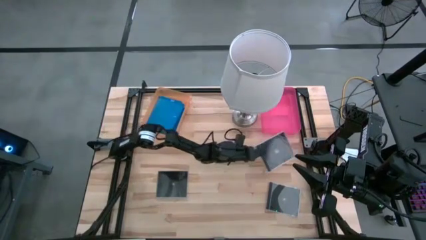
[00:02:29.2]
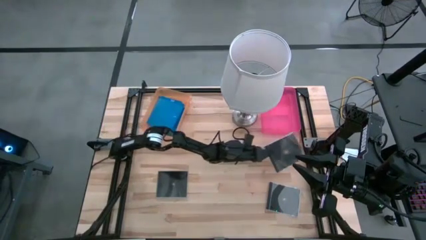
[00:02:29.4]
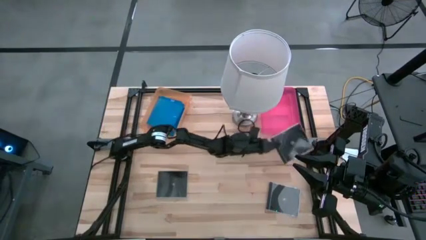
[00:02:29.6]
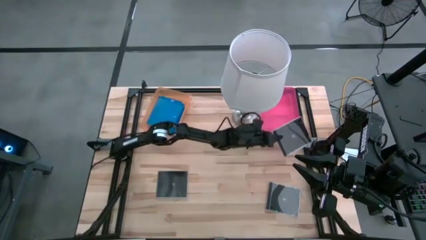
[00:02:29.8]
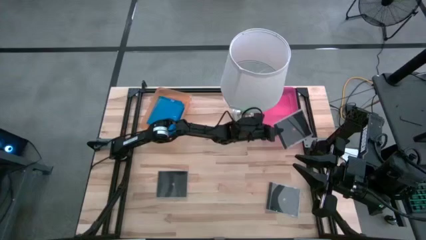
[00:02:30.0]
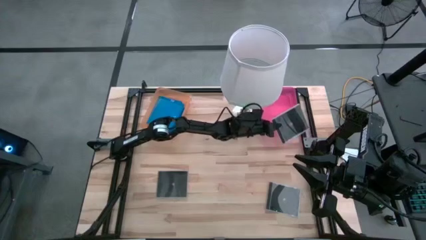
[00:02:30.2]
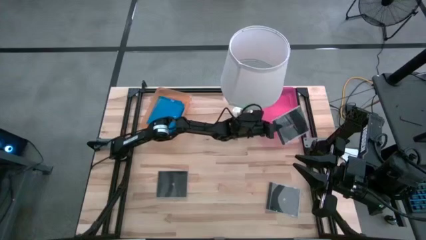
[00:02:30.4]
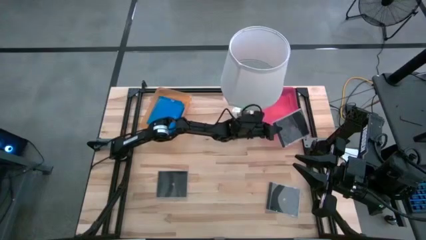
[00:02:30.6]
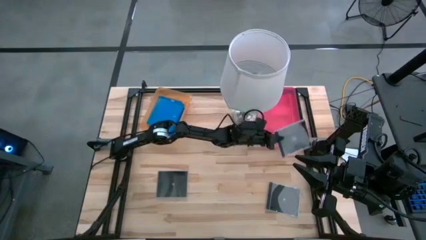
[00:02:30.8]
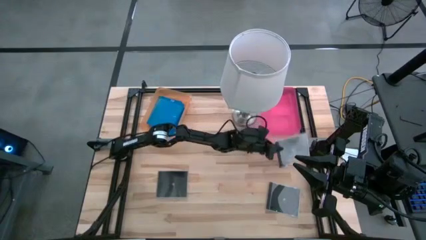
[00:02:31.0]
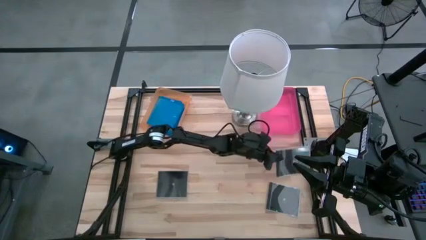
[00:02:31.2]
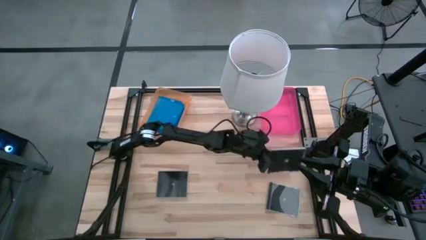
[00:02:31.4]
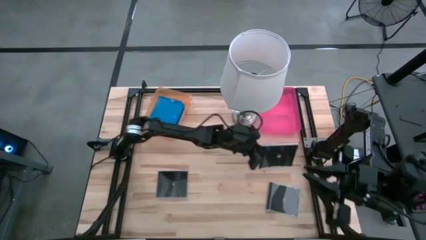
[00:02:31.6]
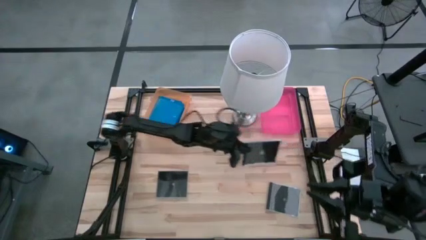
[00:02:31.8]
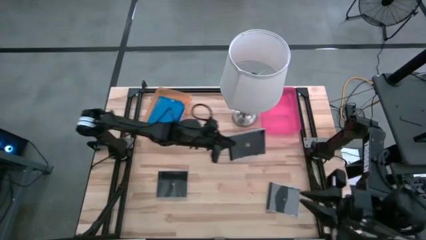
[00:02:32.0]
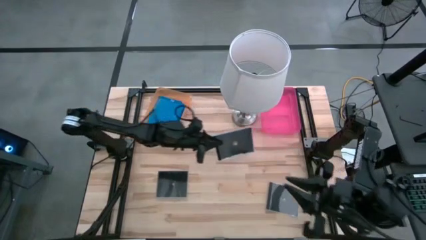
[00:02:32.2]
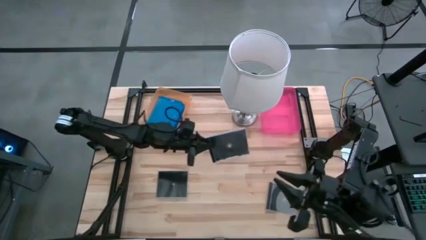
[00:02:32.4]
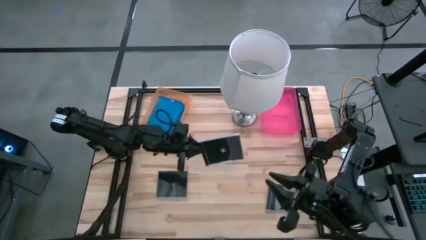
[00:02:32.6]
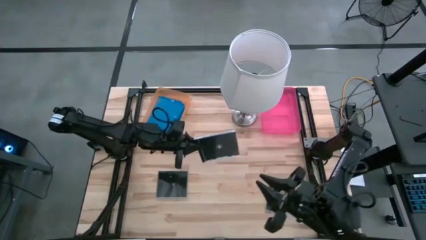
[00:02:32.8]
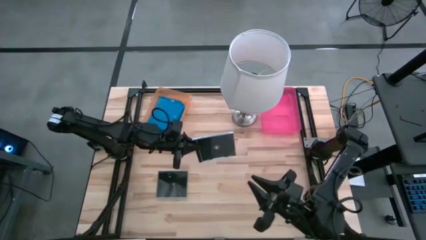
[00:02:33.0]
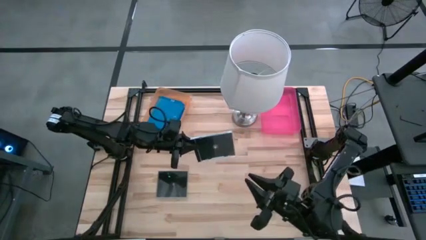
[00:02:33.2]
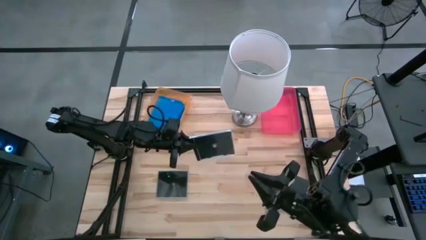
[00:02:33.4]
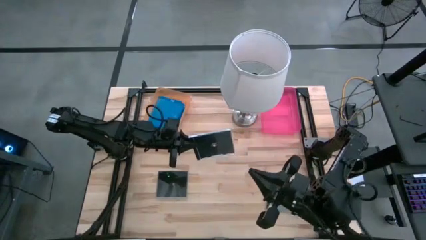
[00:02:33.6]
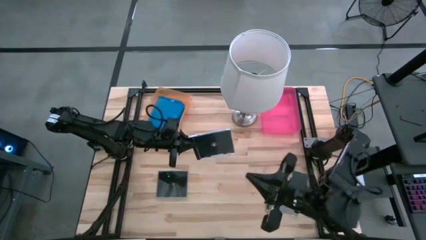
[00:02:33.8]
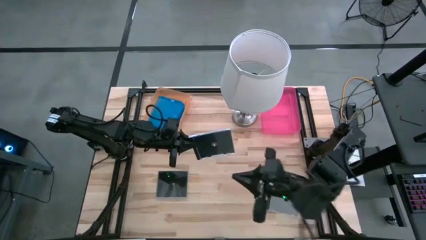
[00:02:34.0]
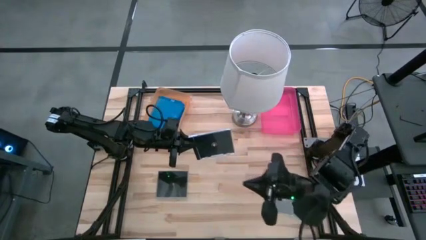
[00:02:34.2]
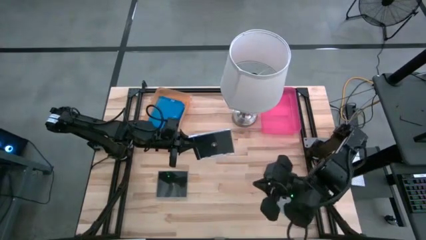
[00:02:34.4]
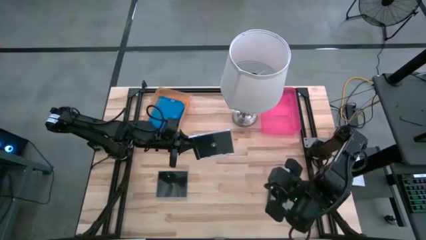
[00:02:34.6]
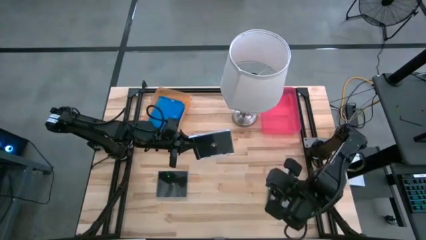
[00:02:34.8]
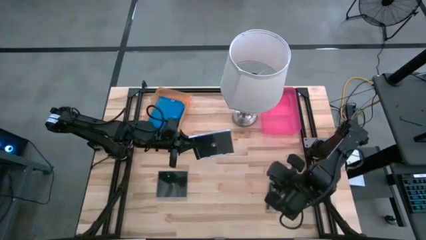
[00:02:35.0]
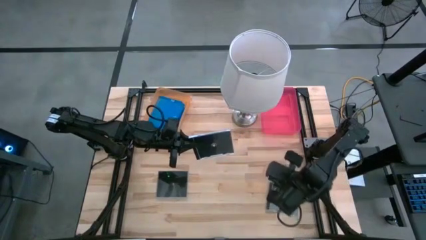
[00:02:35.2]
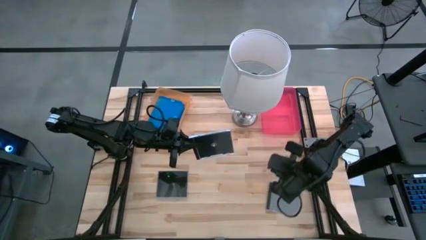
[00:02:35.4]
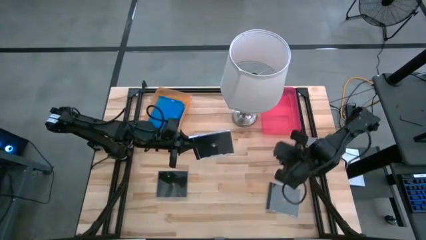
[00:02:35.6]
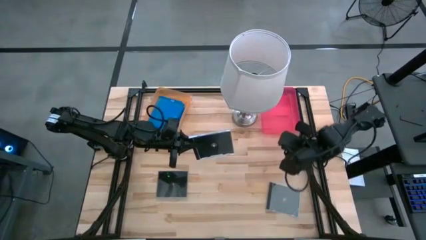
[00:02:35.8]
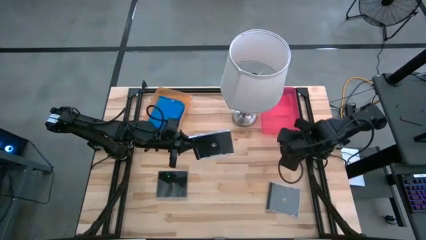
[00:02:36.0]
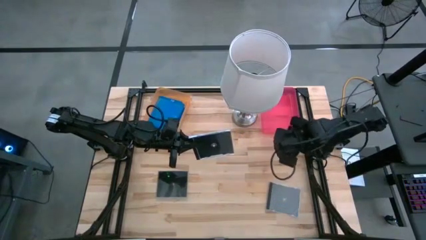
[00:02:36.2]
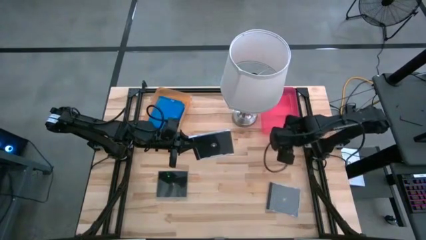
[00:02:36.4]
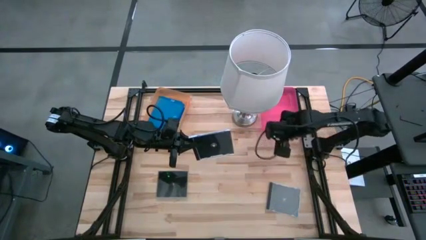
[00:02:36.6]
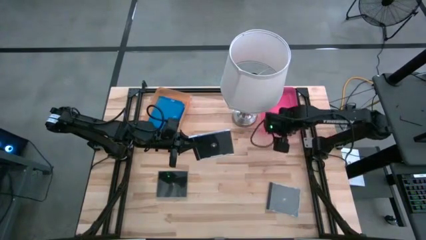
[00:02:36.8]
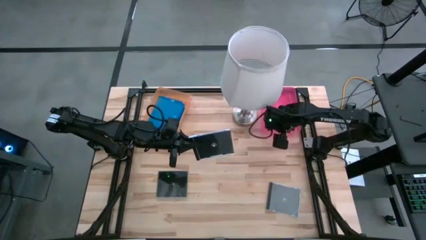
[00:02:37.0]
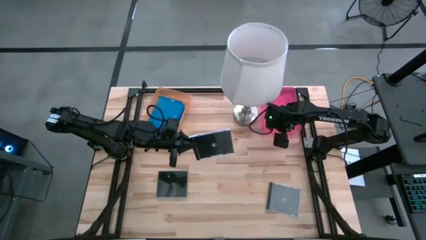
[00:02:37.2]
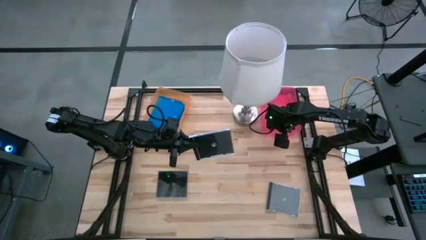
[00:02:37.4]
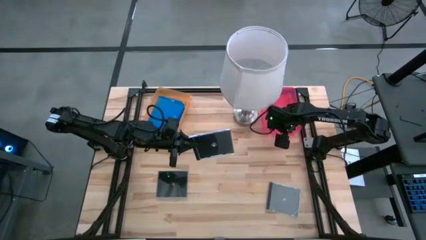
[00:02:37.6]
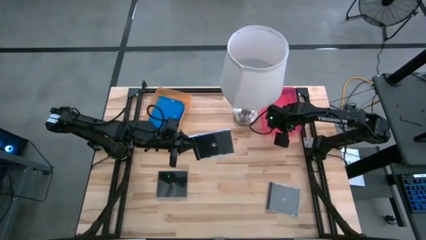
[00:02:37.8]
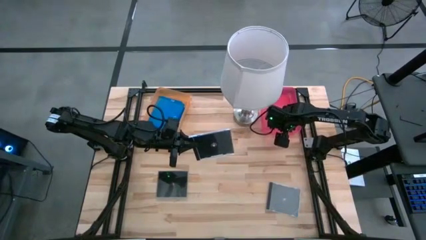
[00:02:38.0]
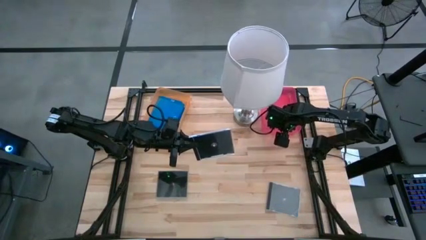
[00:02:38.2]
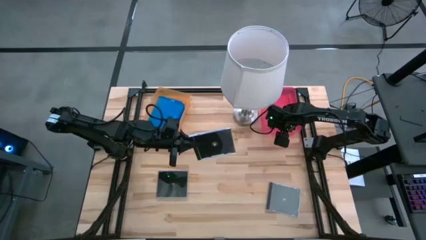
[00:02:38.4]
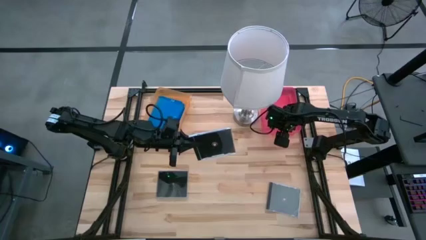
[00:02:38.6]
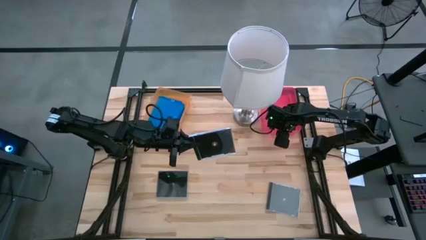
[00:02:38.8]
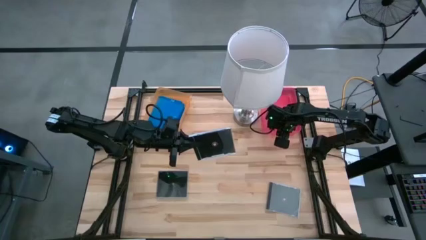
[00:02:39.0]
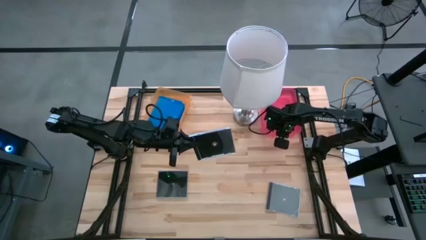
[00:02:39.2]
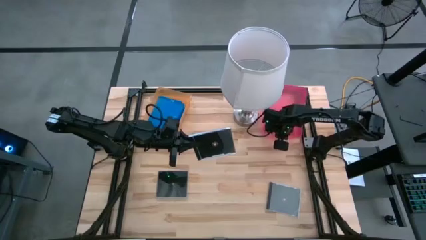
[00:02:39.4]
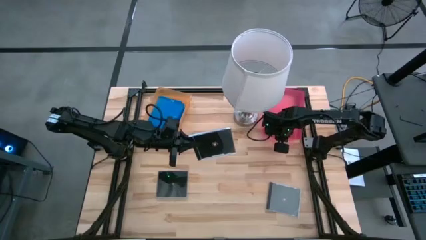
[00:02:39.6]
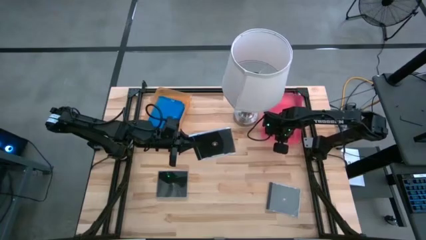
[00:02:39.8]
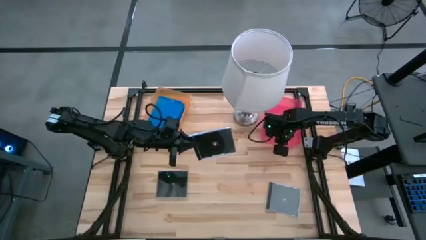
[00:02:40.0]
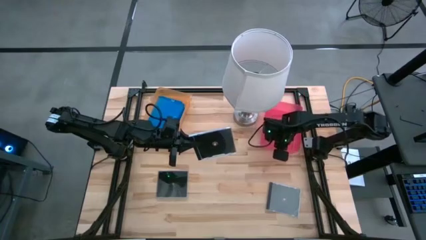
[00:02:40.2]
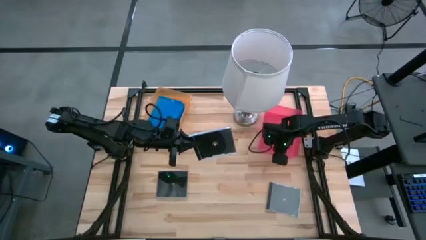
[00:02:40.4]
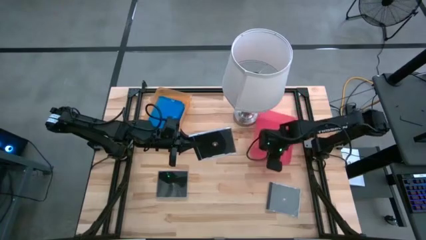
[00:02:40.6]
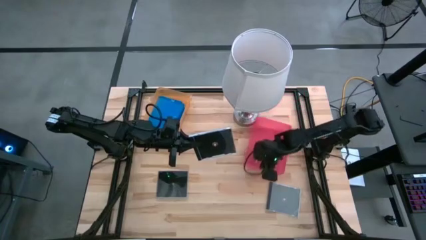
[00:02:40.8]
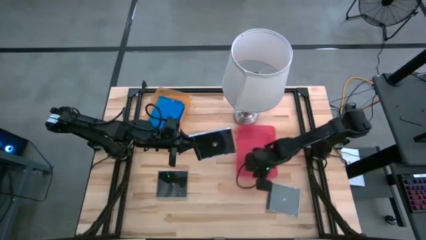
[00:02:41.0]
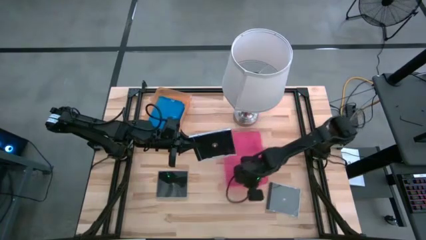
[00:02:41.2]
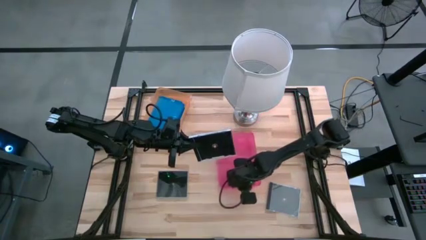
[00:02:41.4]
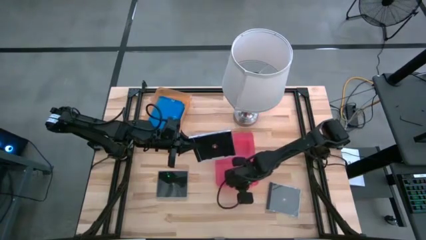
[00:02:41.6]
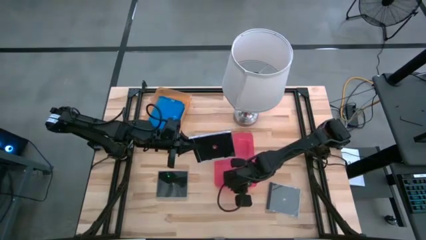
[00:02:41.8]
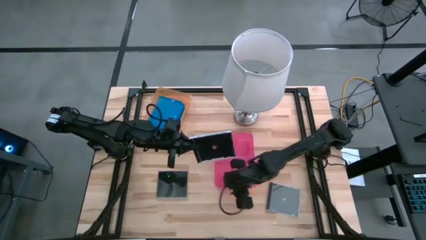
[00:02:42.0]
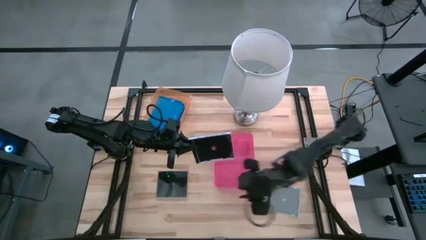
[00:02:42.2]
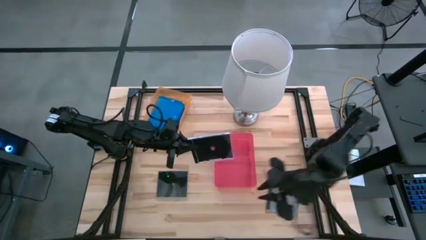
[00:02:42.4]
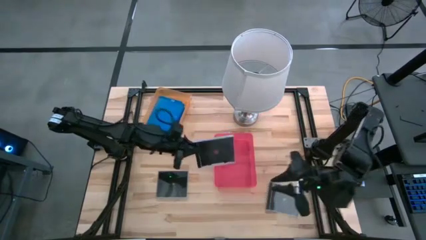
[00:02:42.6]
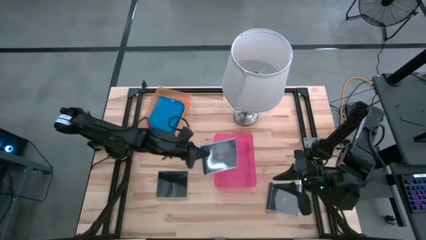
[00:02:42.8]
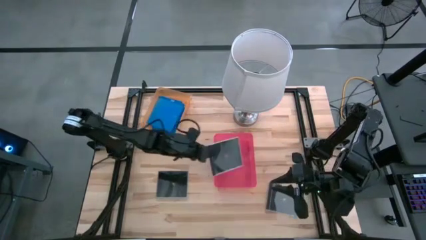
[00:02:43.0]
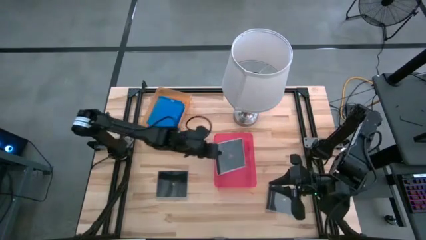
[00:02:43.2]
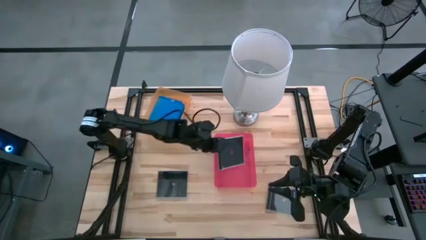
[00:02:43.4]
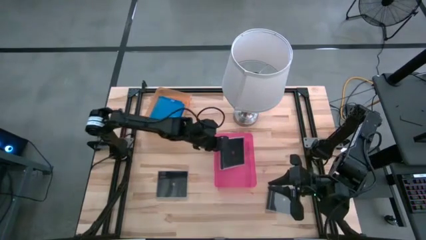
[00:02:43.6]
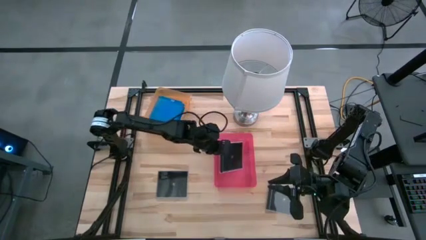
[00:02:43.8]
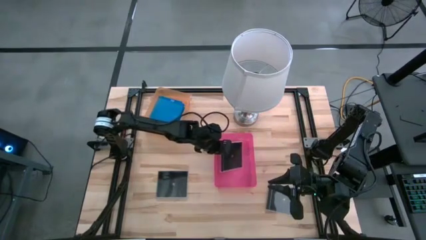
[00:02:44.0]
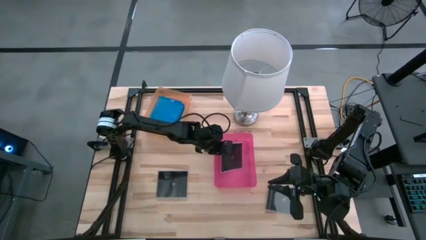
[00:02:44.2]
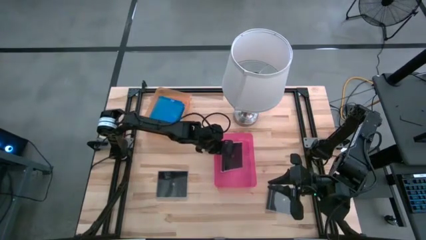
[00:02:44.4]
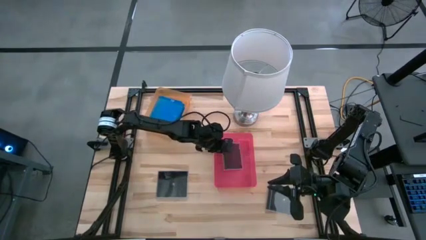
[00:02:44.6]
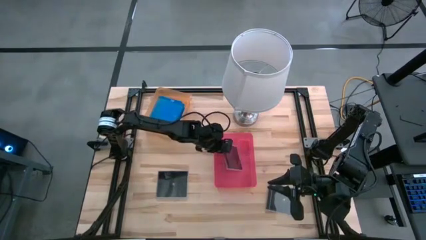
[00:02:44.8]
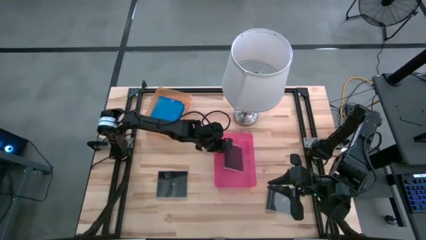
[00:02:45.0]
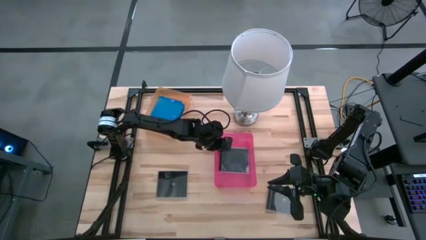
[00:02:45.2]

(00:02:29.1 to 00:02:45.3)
Task: Pick & place jewel cases by type
Put the middle black cd case into the pink bin
